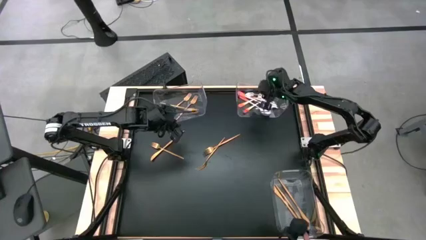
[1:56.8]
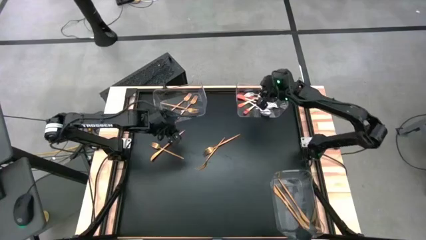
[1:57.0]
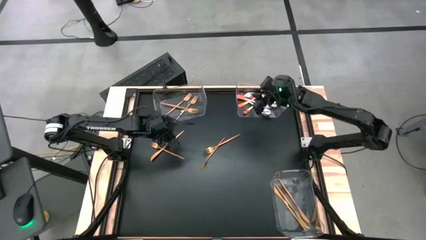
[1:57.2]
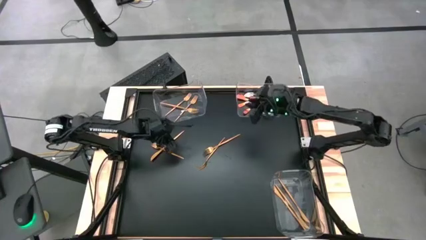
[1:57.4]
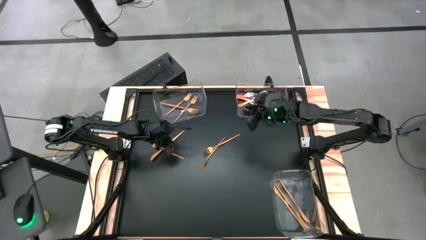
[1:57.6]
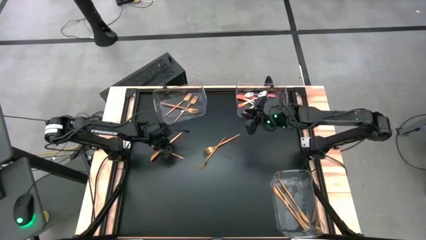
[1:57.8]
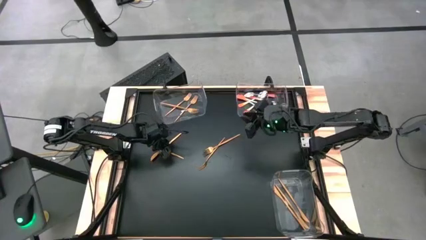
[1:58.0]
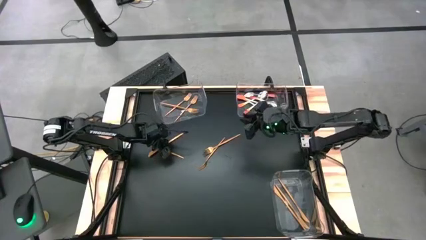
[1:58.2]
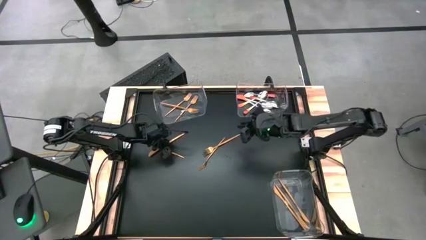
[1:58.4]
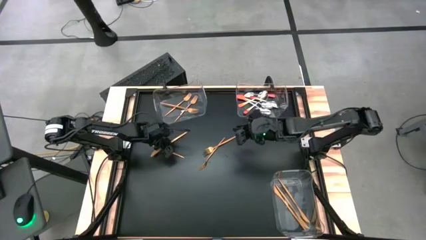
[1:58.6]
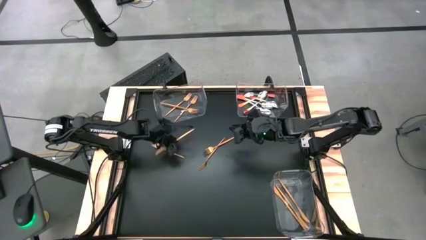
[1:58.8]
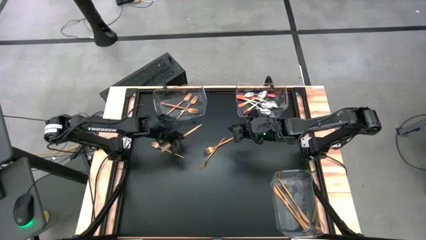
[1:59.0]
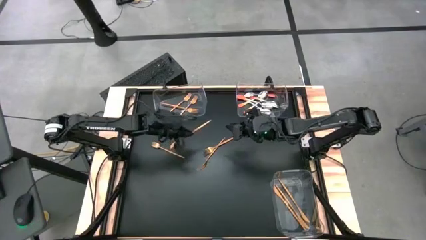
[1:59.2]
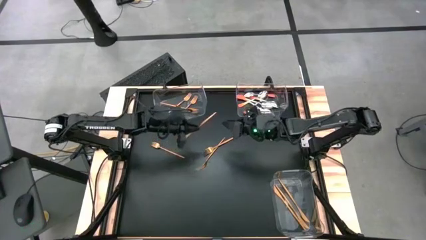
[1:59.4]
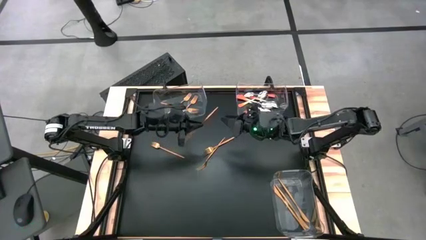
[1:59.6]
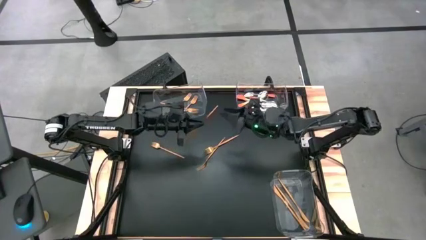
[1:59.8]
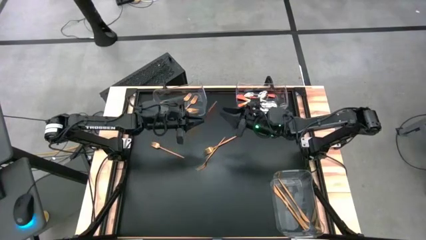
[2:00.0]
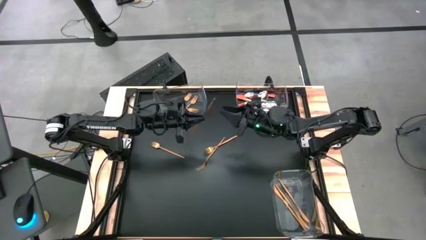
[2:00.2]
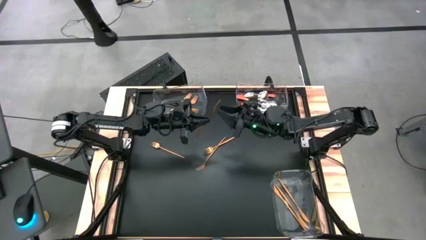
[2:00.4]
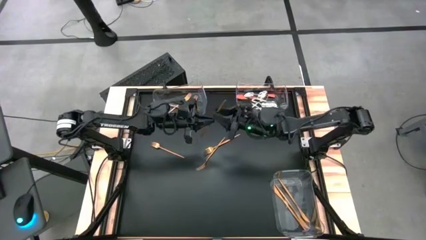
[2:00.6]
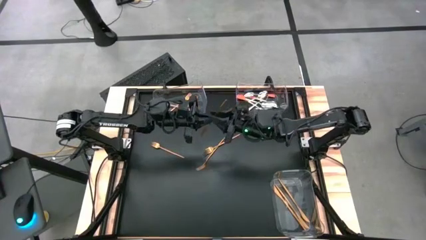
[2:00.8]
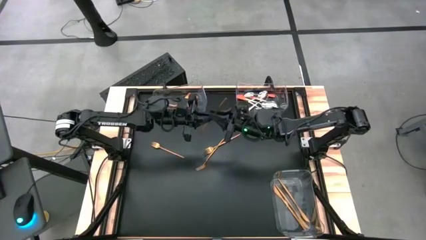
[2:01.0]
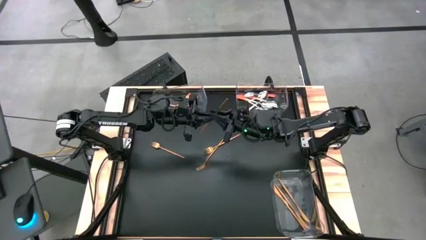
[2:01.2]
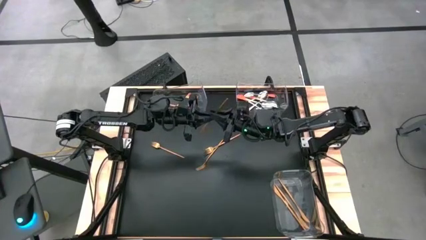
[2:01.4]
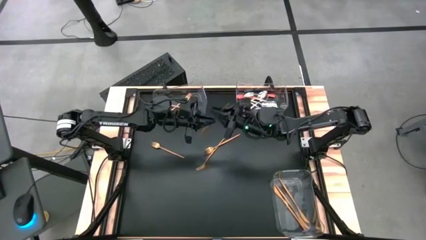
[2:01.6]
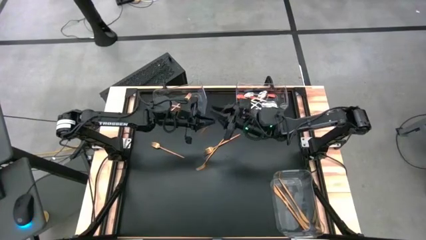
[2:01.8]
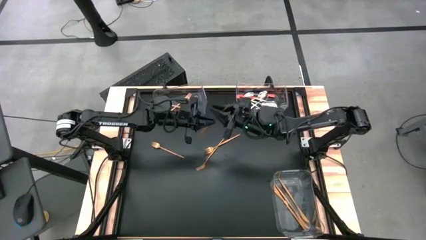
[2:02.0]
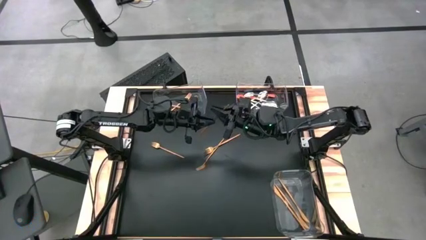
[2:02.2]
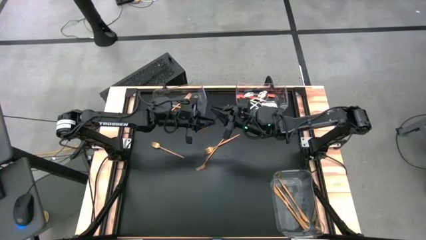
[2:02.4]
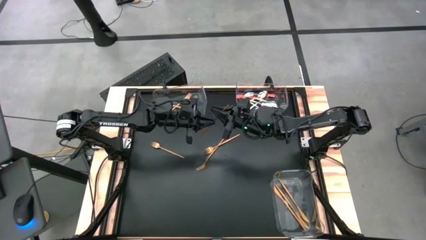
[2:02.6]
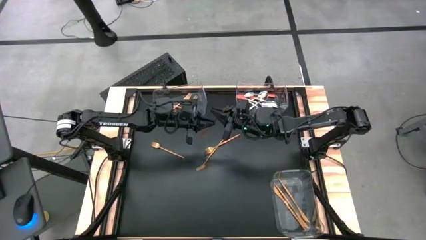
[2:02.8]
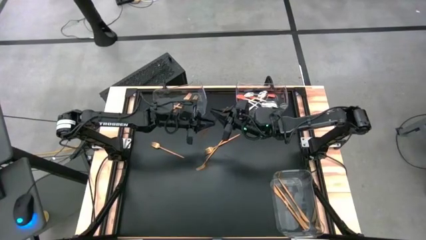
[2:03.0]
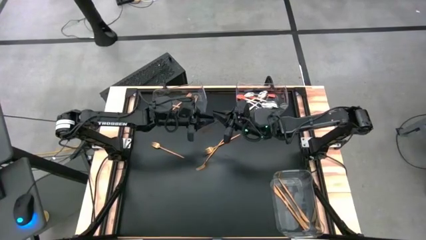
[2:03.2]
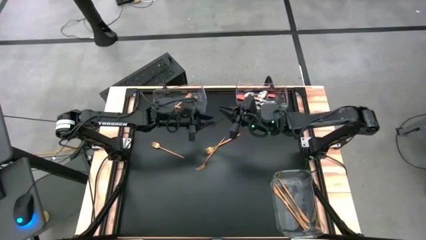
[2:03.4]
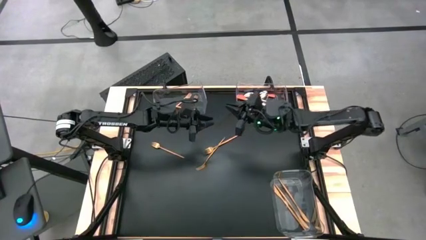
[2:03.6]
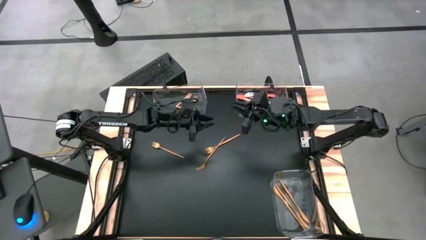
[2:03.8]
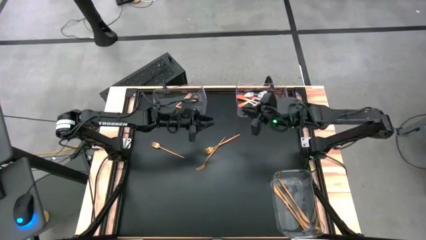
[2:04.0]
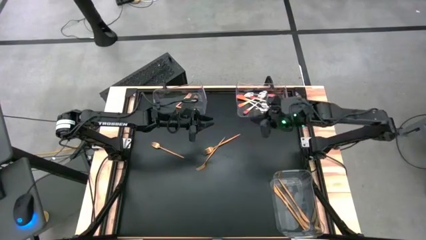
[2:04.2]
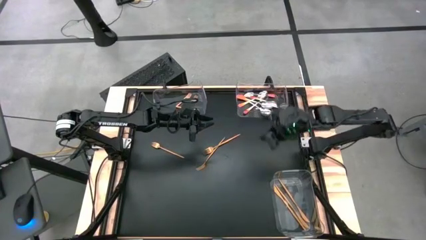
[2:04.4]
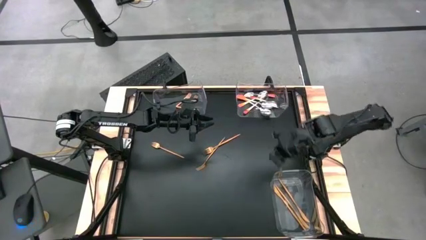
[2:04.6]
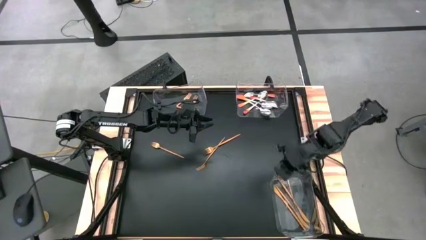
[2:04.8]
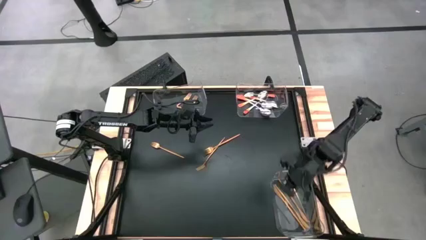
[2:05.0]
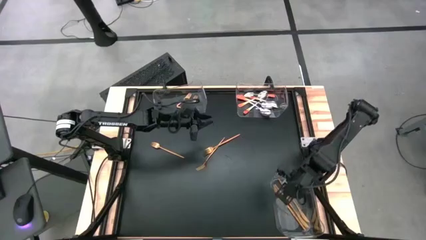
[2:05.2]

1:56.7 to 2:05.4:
Task: Sort silverware by color (type)
Put the gold table knife into the bottom left transparent bin

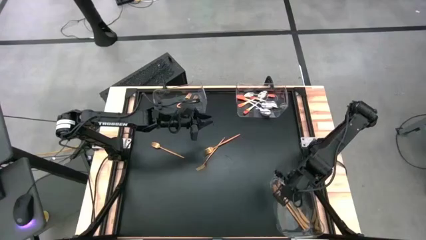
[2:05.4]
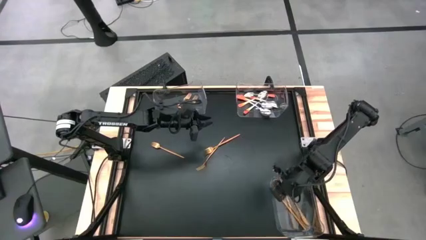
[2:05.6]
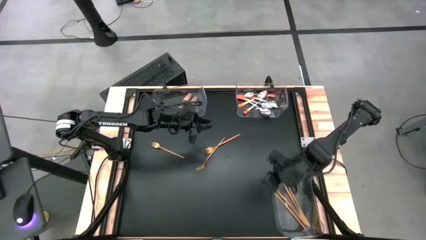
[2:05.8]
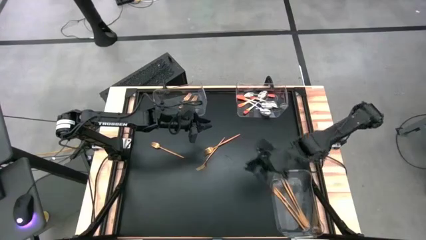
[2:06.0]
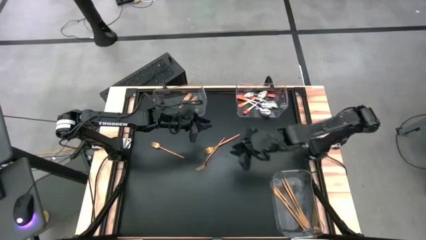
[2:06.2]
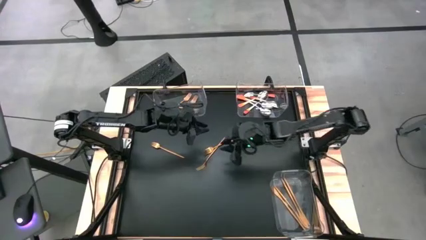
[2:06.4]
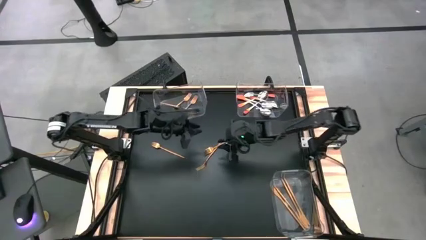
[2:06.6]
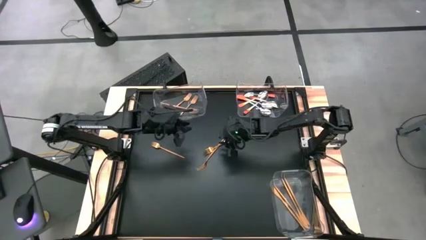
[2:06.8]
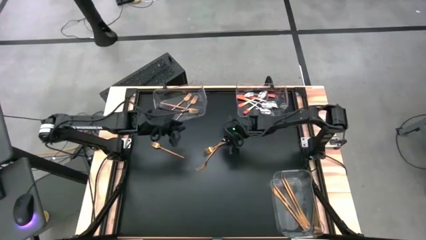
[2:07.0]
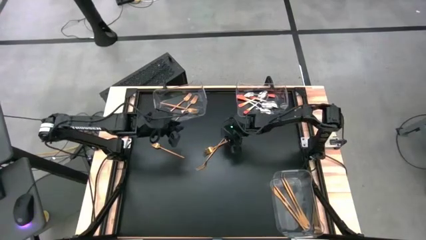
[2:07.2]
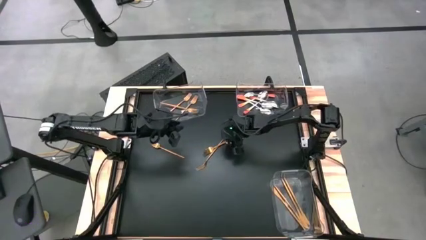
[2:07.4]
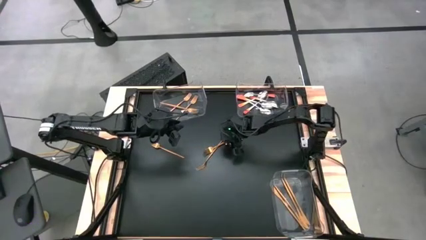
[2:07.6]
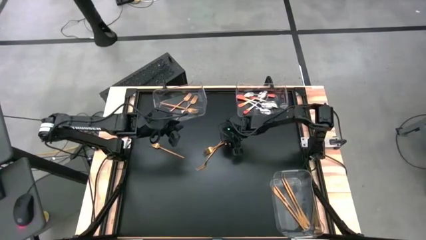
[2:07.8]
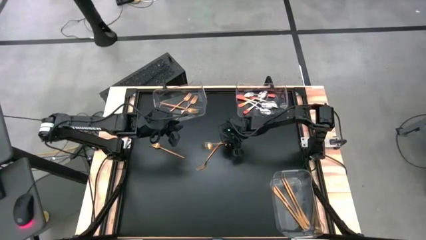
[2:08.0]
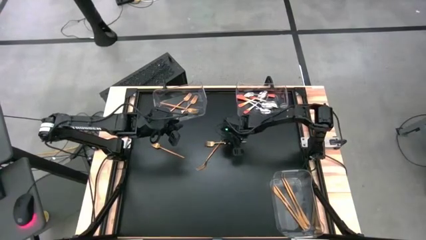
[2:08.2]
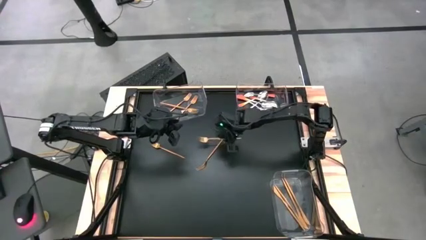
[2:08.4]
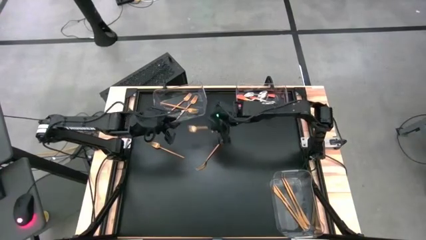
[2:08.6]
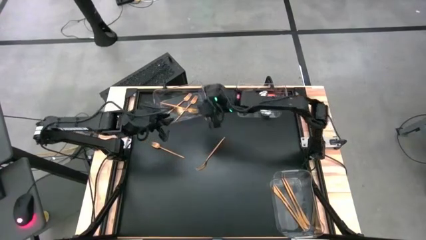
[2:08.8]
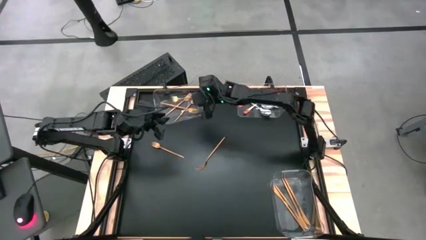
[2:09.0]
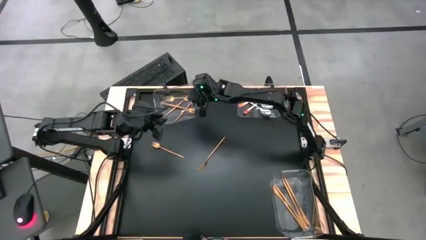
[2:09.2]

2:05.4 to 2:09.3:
Put the gold fork into the top left transparent bin

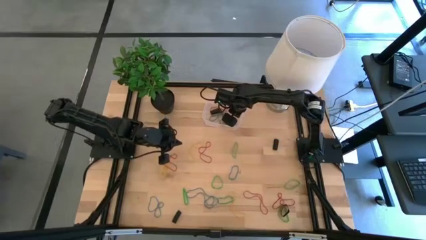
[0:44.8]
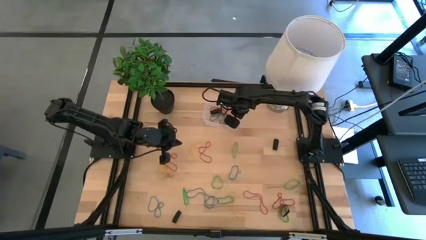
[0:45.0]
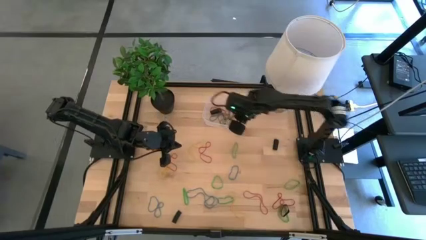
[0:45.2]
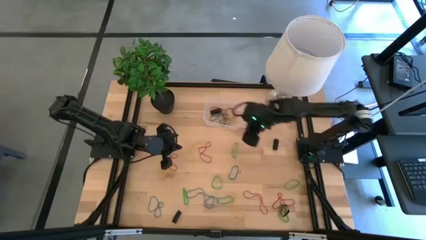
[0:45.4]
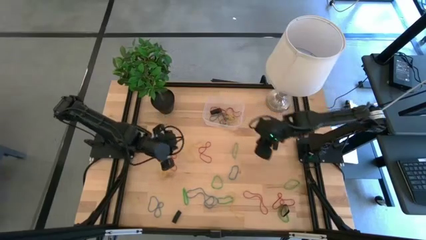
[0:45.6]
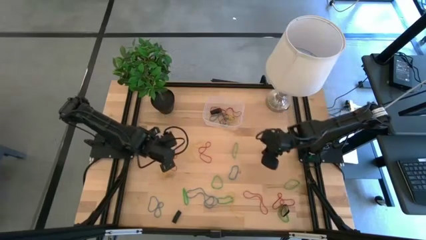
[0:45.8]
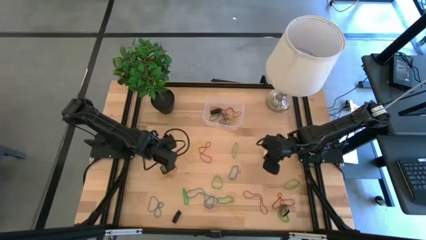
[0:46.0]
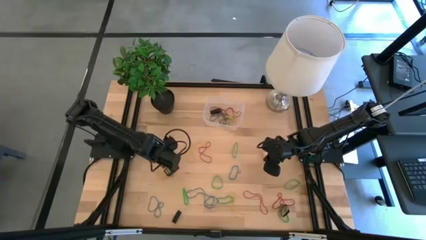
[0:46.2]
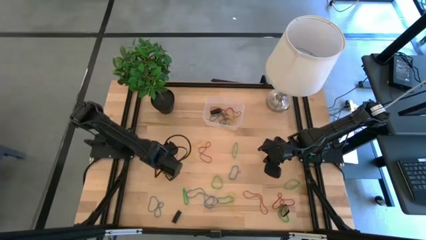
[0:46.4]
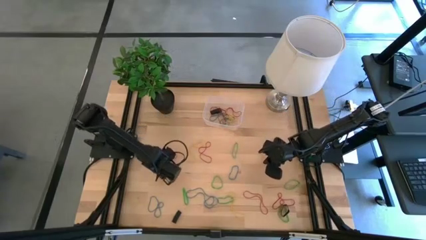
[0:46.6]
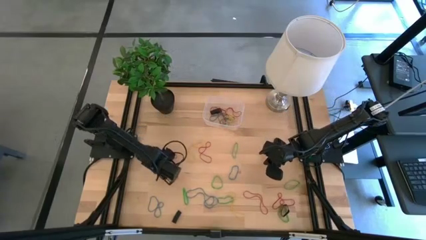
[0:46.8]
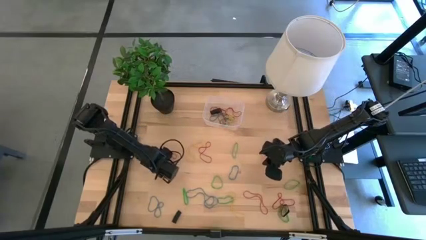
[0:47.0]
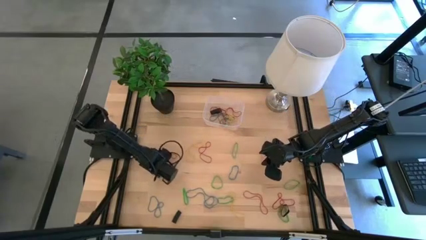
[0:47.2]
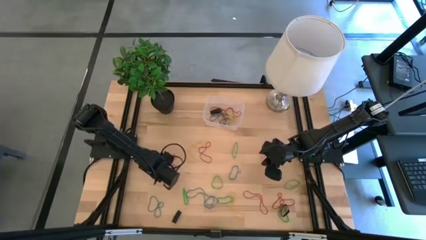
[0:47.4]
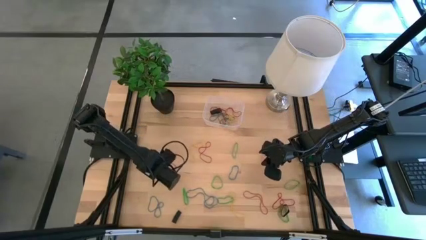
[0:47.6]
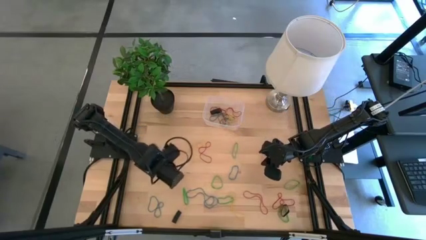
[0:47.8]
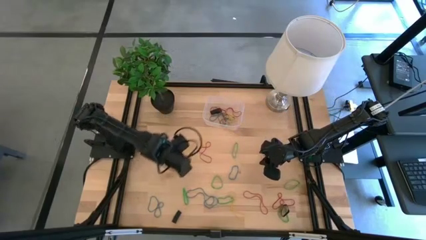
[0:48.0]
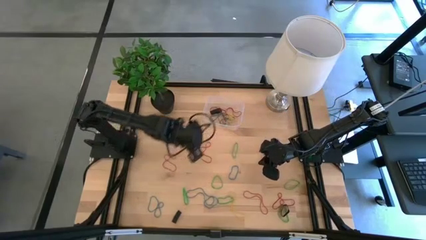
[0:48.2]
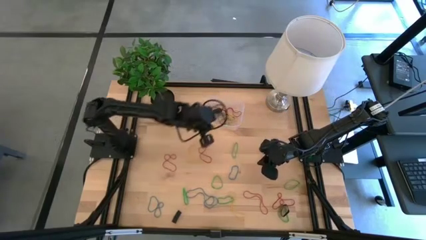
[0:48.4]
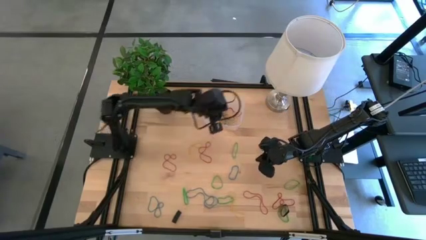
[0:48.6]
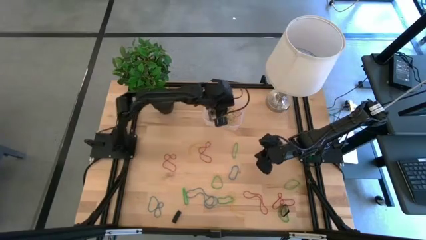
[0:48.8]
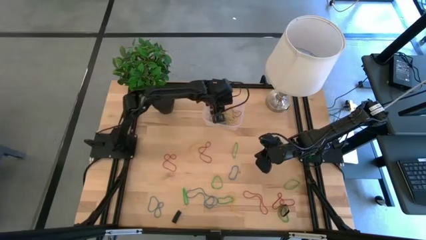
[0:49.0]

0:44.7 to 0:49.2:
Task: Pick and place rubber bands into bin
Put the yellow rubber band into the transparent bin
